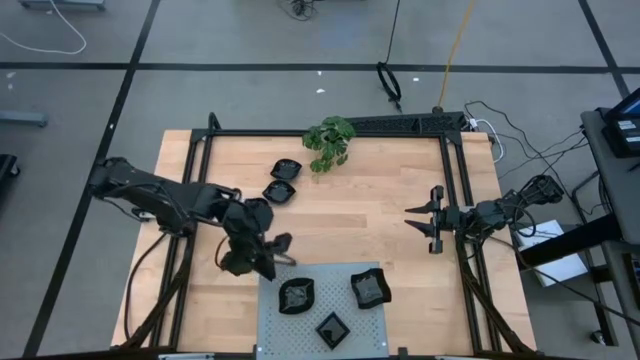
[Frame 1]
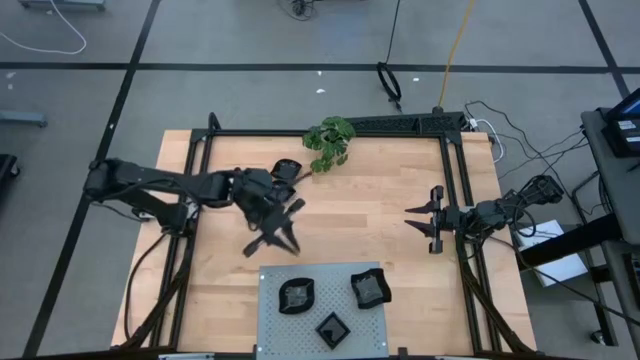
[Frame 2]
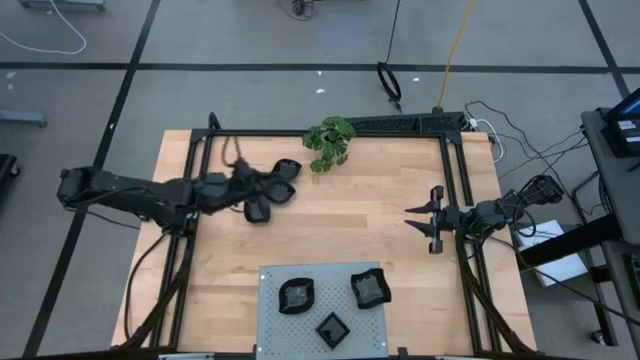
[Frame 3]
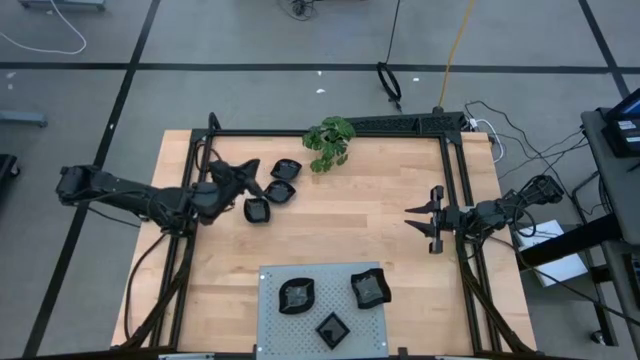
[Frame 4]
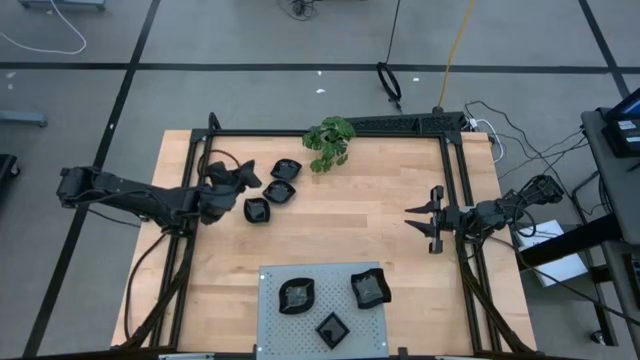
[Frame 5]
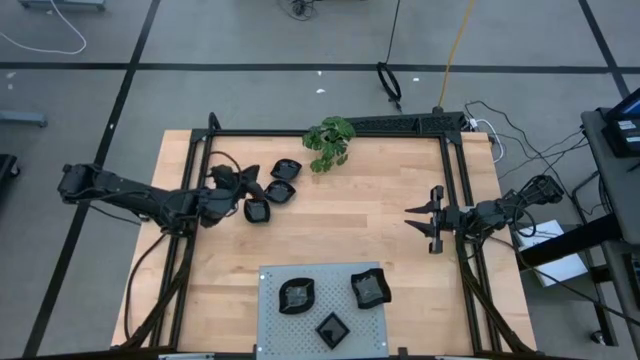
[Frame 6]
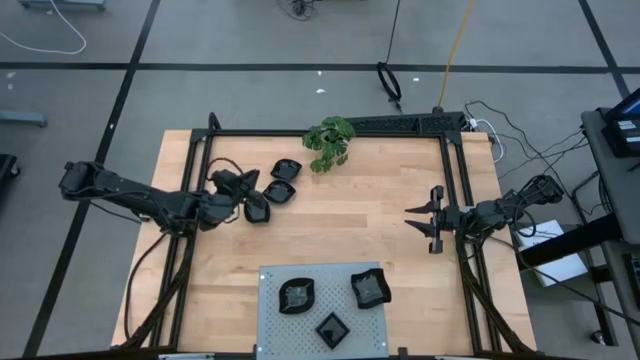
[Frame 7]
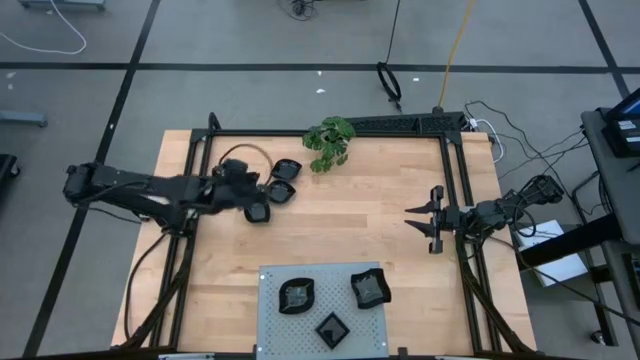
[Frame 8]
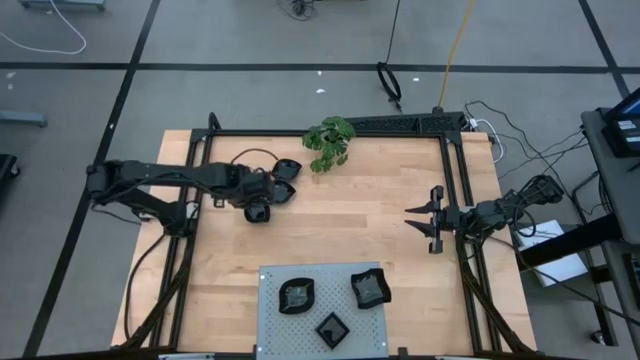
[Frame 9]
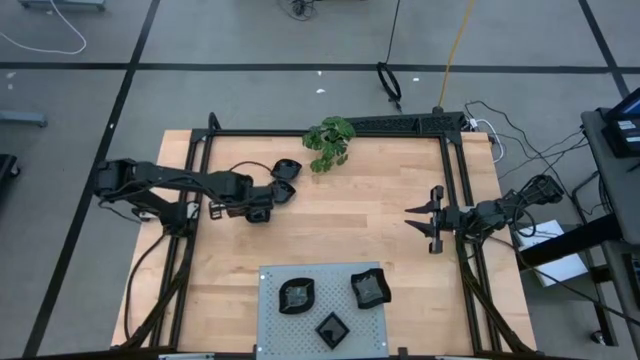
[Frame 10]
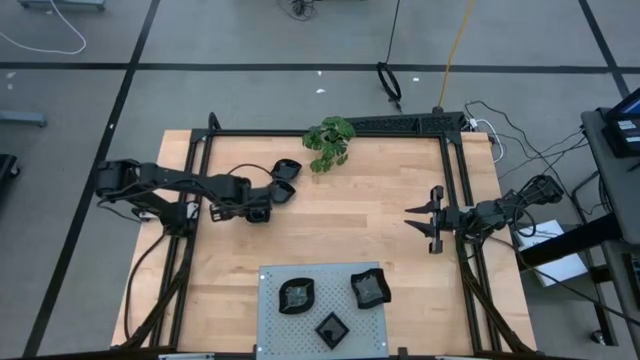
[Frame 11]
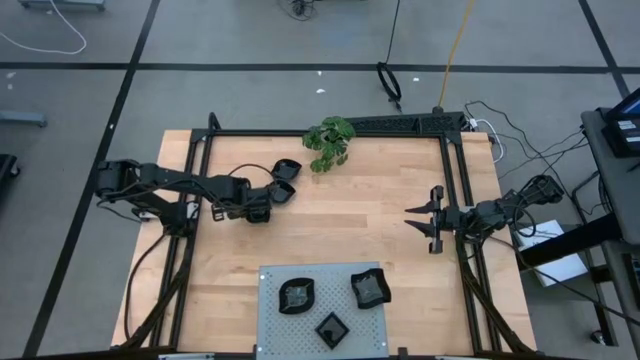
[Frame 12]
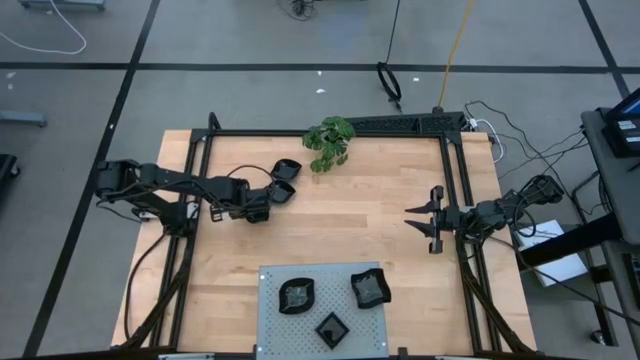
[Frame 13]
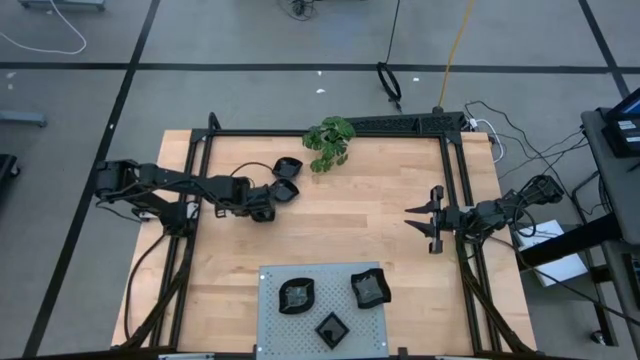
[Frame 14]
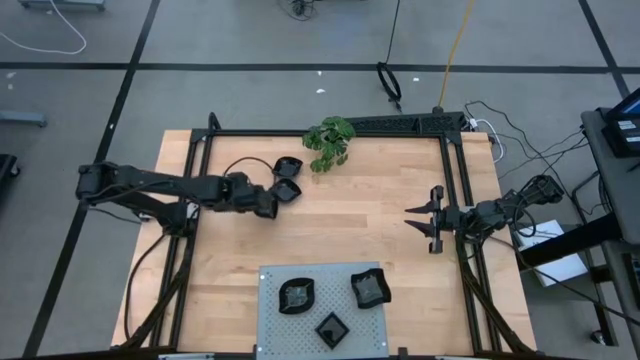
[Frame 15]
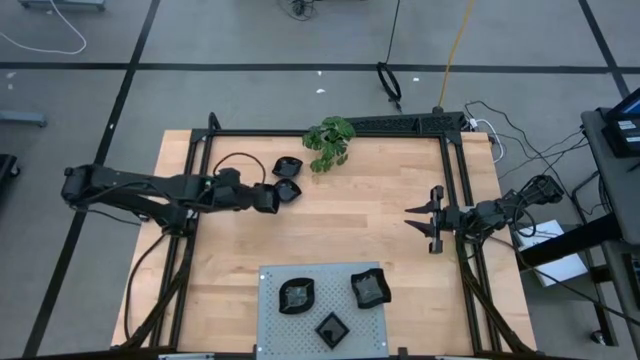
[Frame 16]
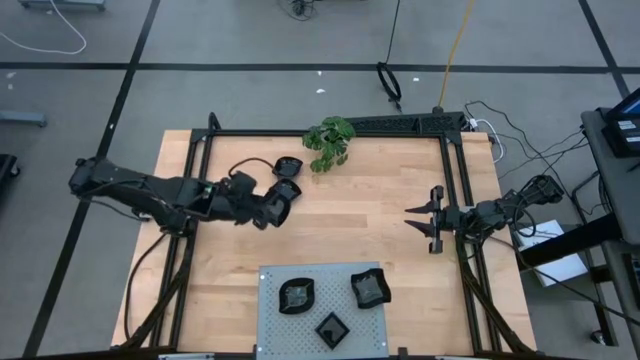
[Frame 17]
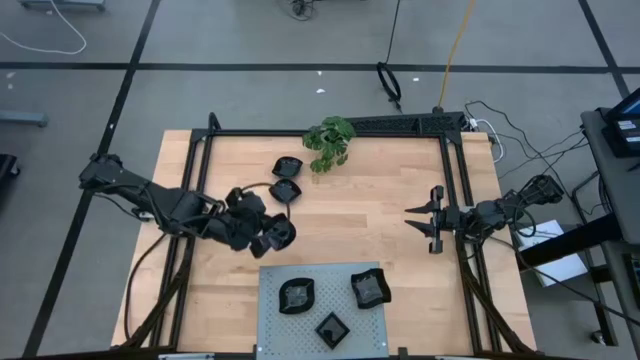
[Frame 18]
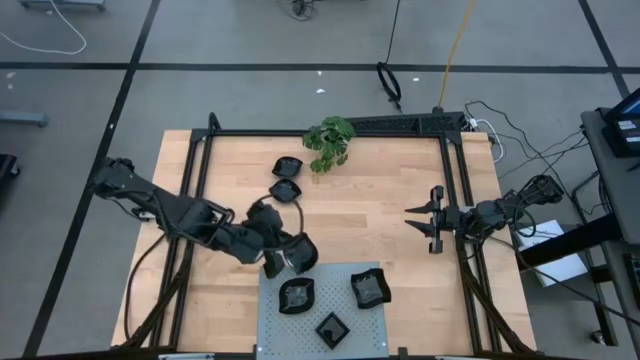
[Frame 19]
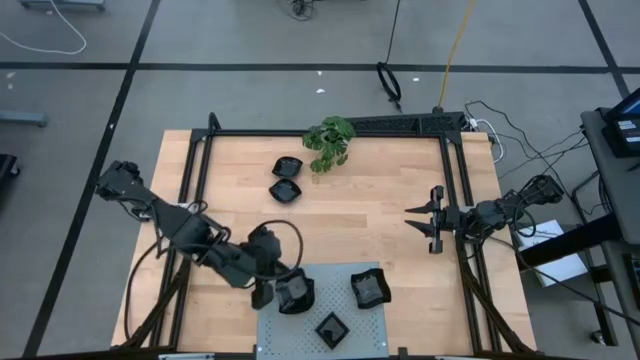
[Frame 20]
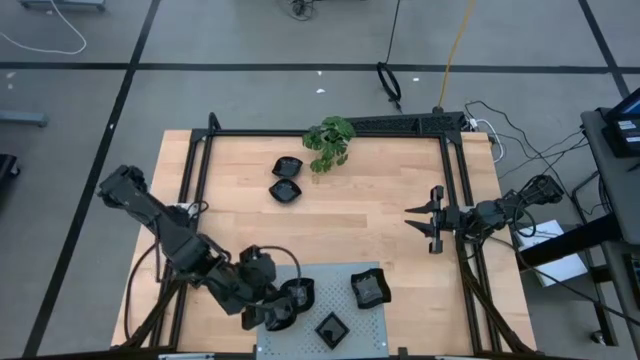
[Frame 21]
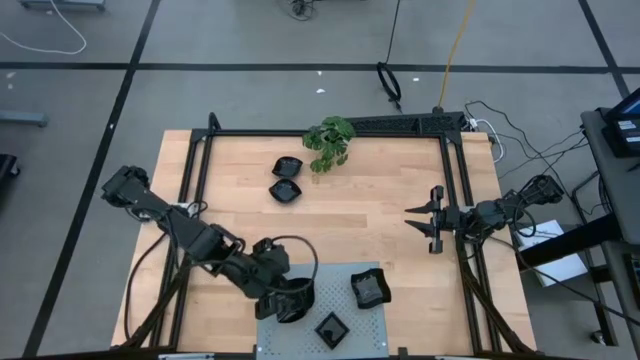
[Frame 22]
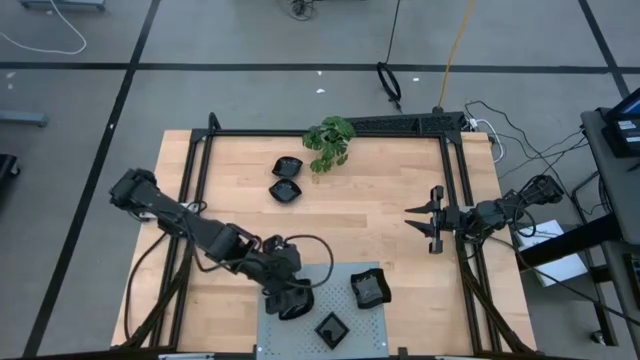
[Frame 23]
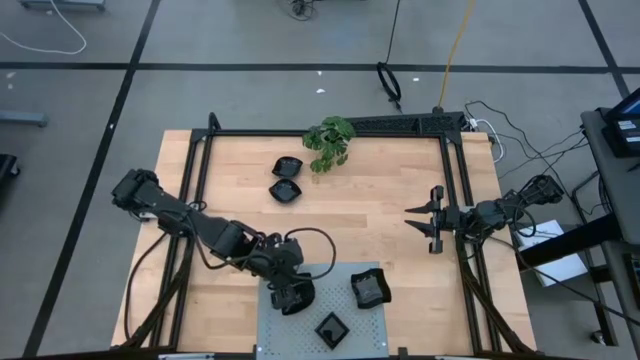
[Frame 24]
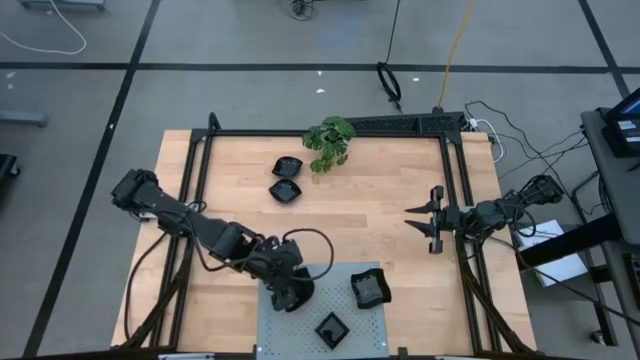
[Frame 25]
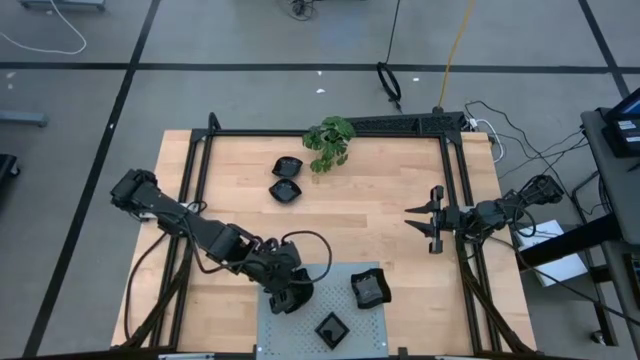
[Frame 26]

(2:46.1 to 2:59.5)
Task: Pick & Place Mini shaped plates
Stack the leaf-shaped plate onto the other leaf-shaped plate on the shelf

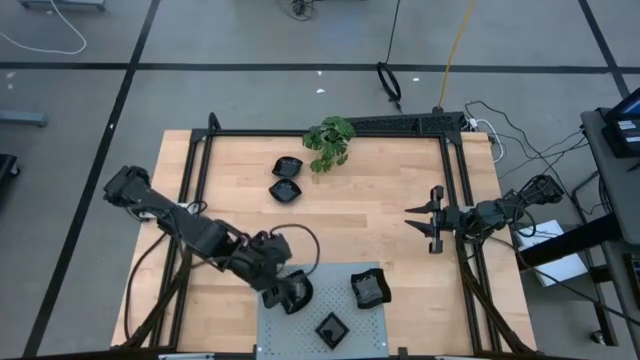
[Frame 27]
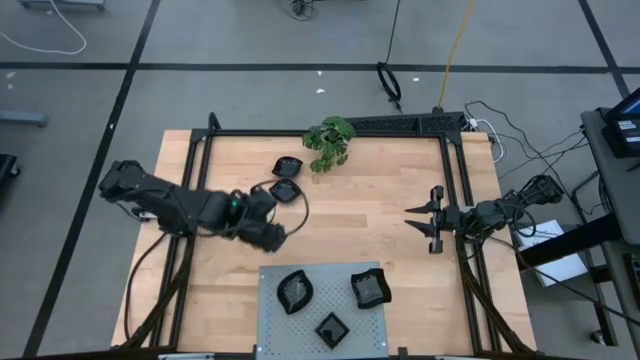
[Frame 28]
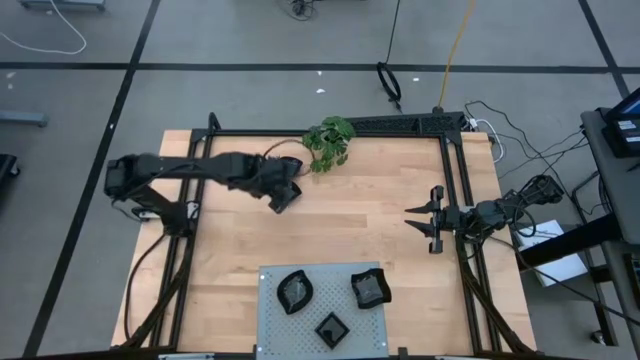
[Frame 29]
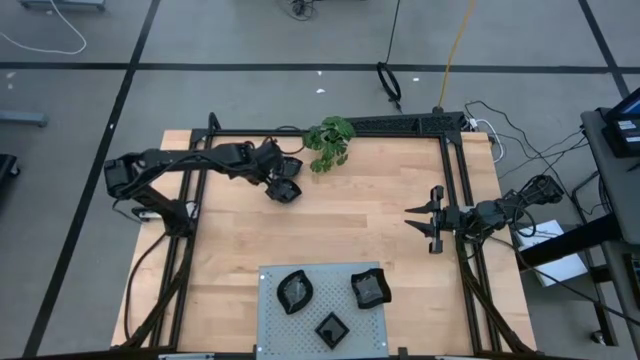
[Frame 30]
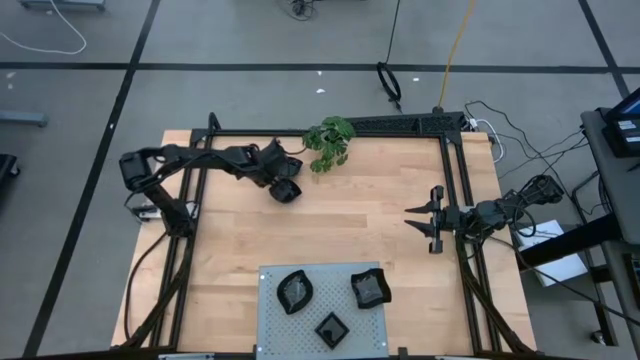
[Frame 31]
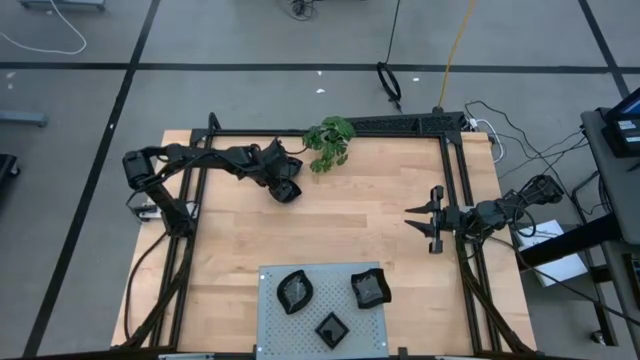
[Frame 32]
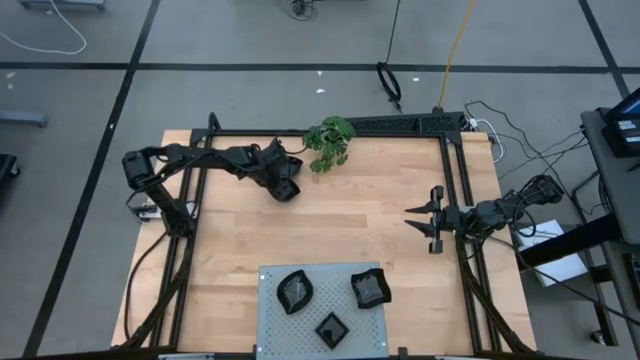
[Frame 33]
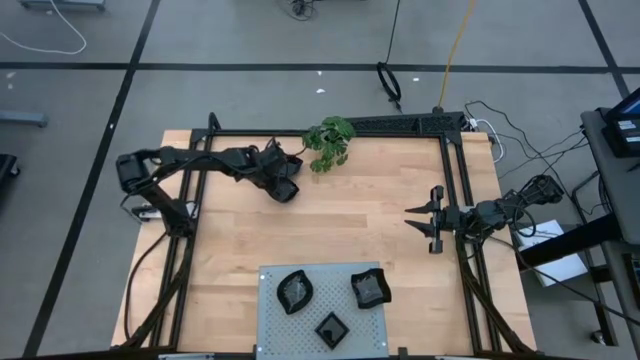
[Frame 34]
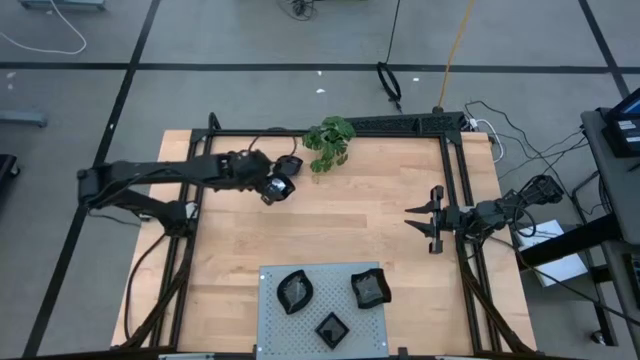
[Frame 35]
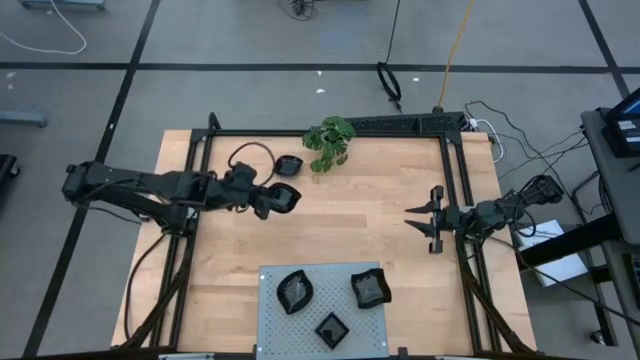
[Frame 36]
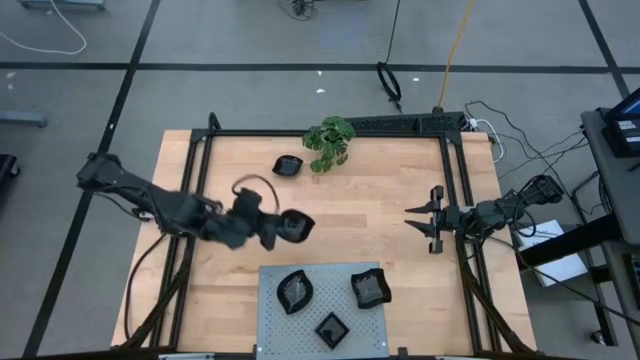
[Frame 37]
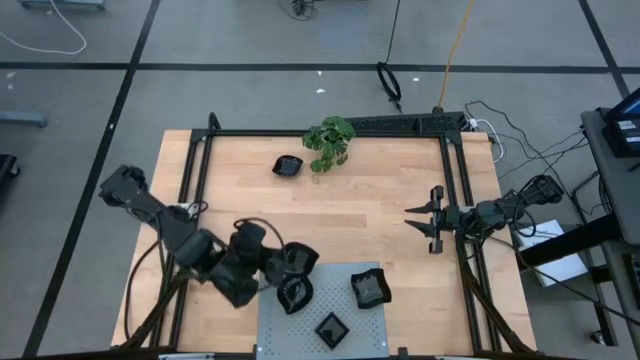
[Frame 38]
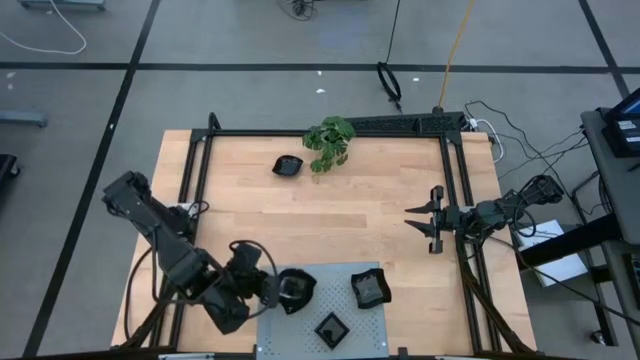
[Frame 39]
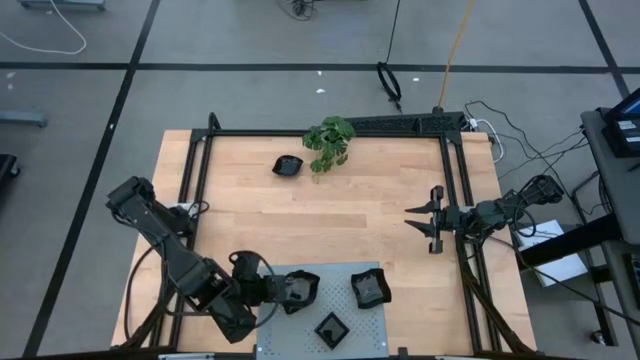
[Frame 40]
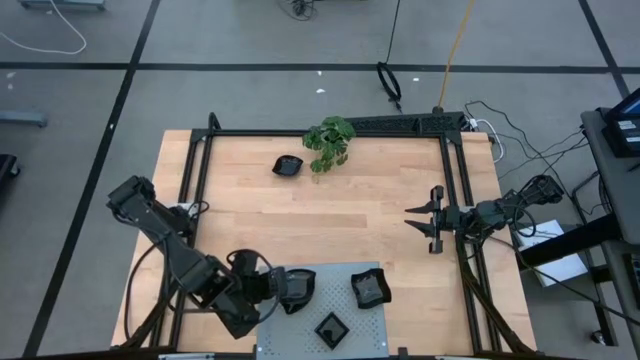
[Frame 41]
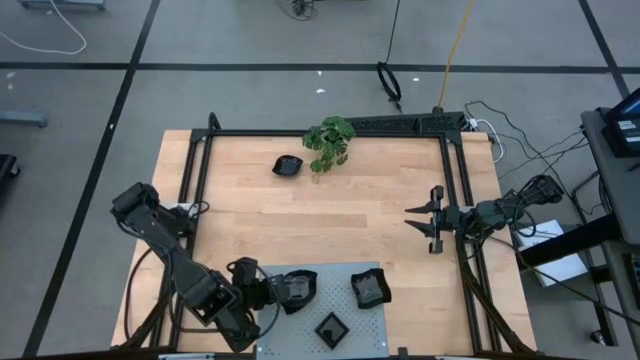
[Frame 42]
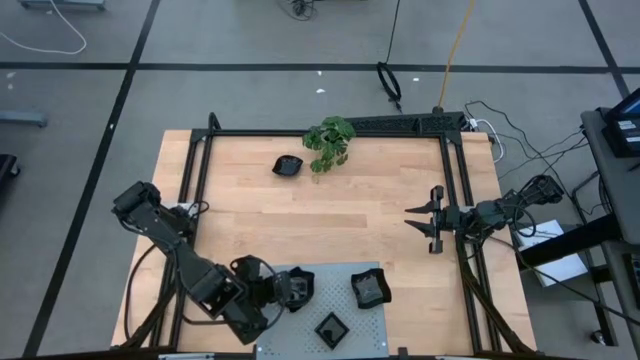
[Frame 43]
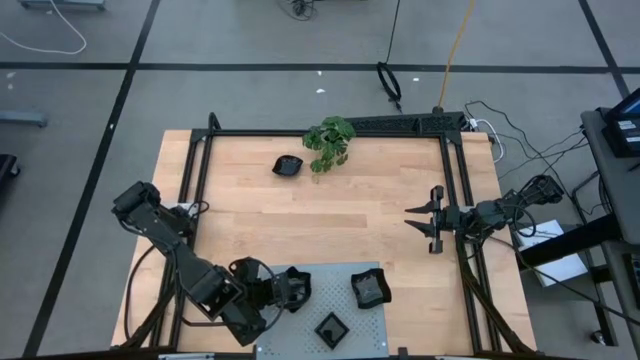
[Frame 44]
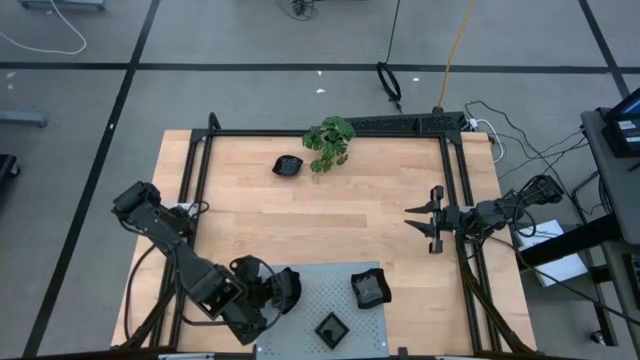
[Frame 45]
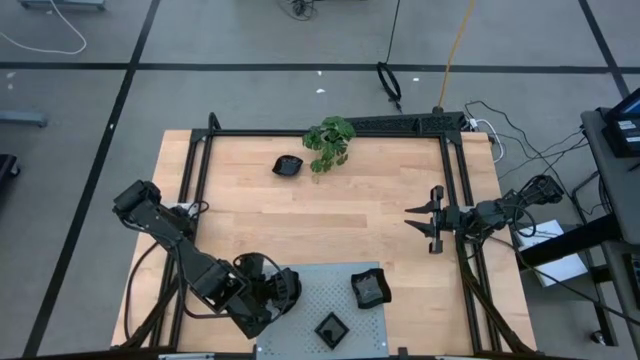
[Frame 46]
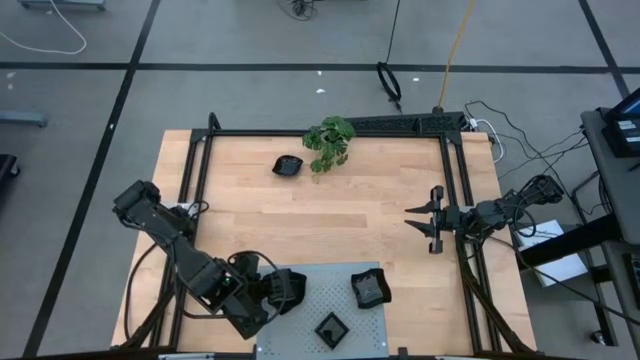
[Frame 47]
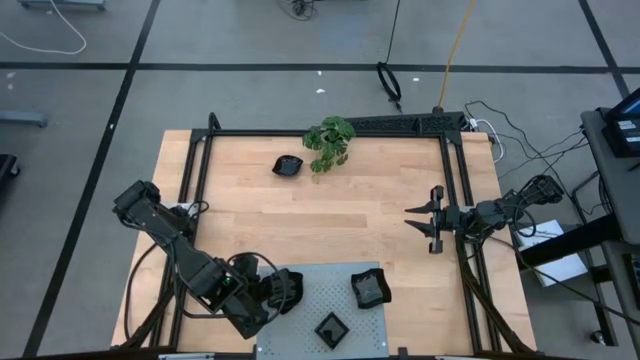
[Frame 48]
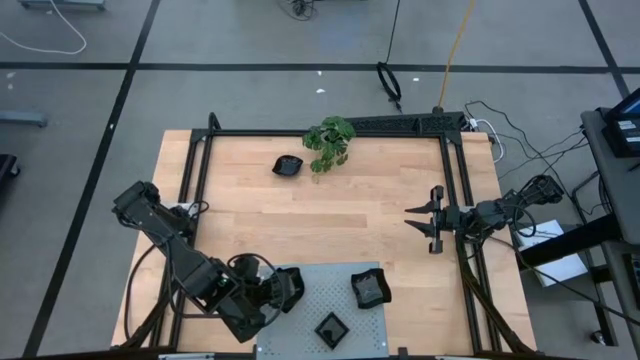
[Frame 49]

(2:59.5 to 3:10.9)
Stack the leaf-shaped plate onto the stacked leaf-shaped plate on the shelf
